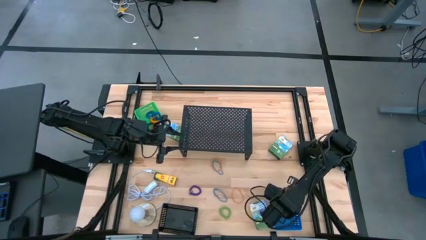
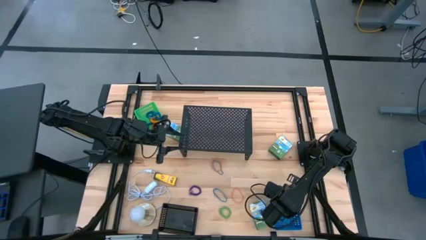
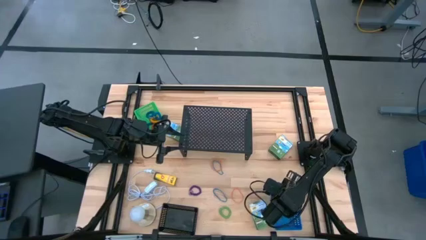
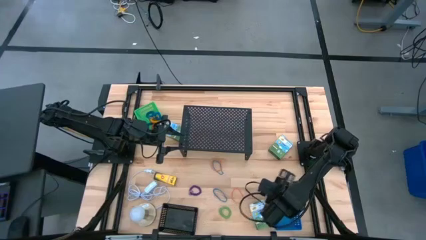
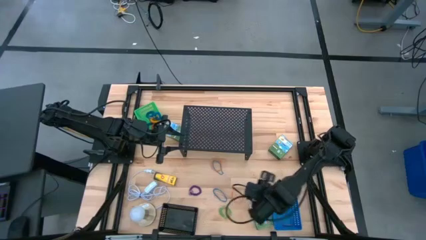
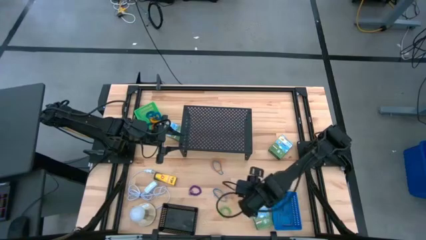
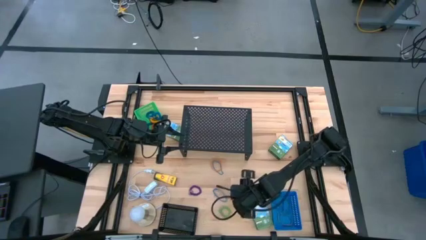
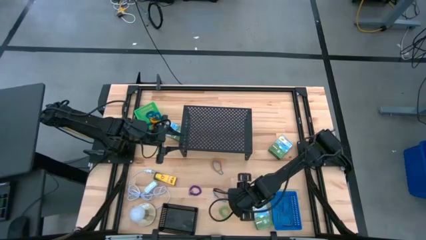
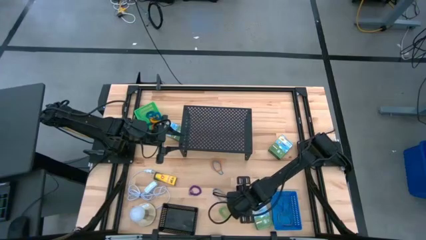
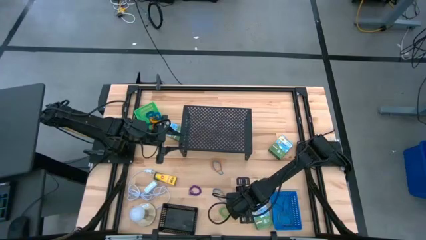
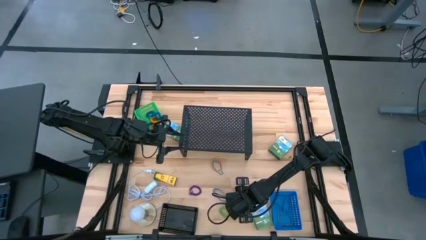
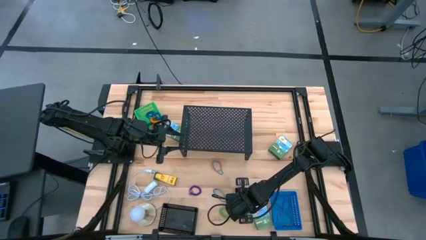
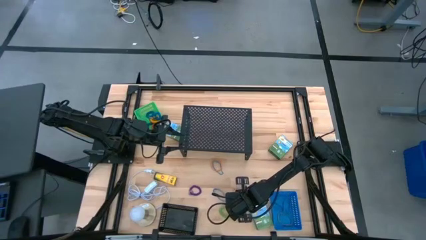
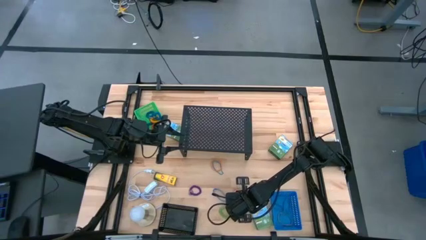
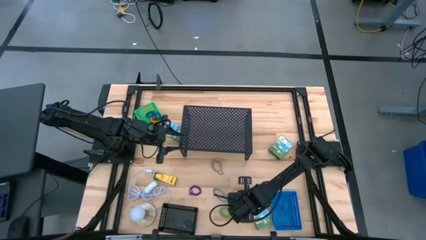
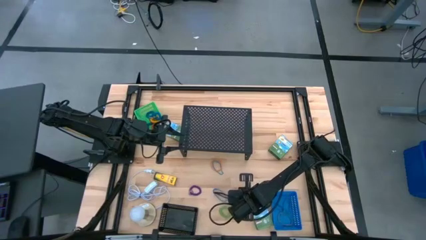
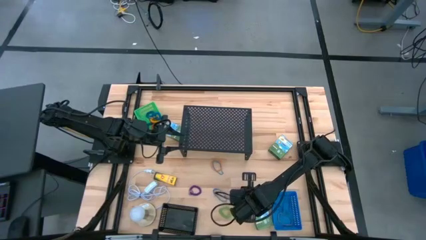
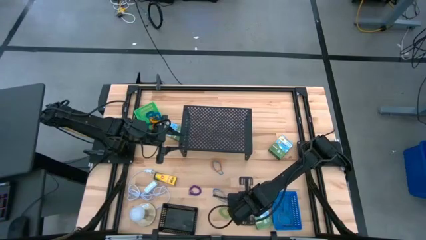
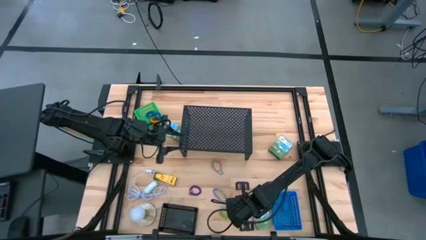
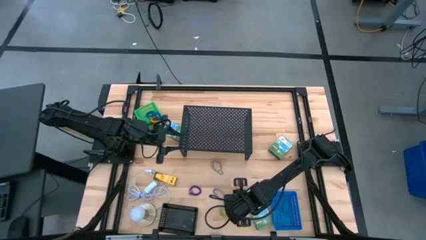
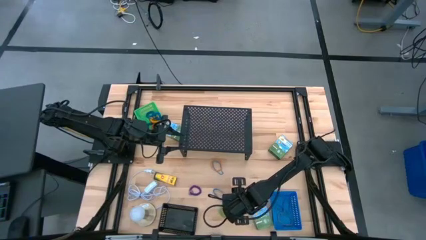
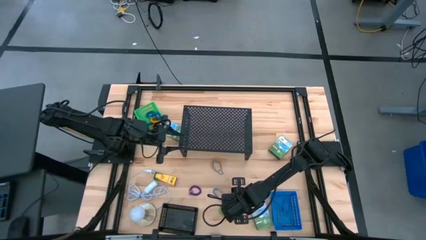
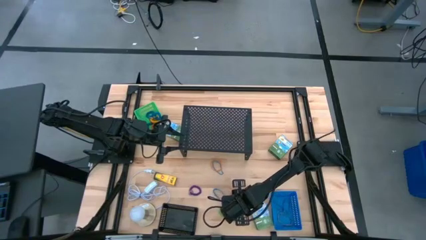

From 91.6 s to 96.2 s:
Task: Pick & Place Office Desk Supplies
Put the orange rubber band into the blue bin

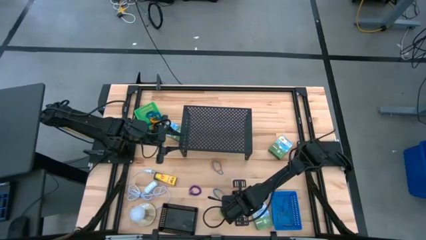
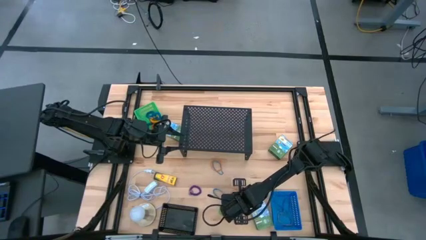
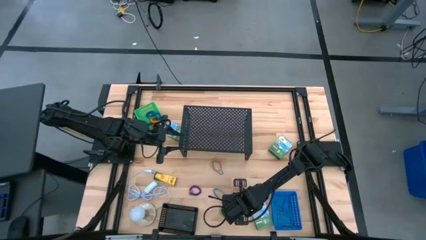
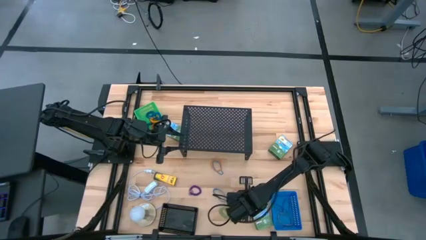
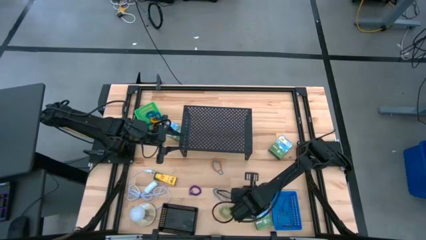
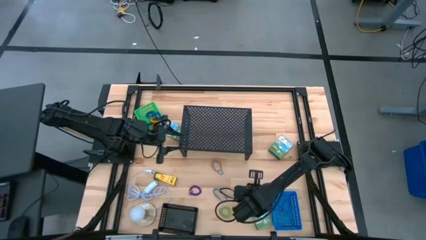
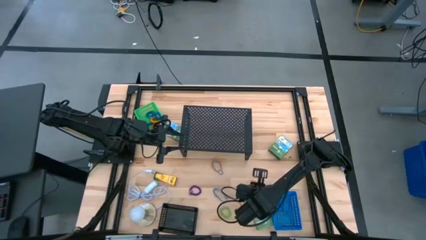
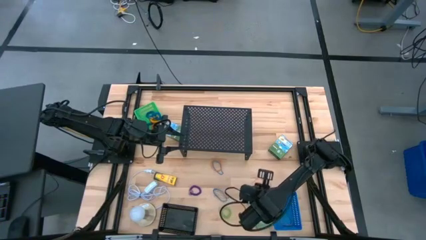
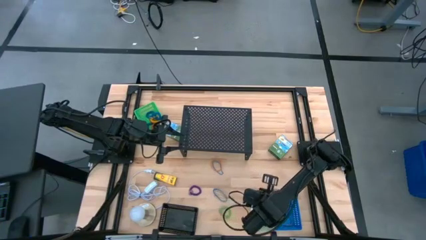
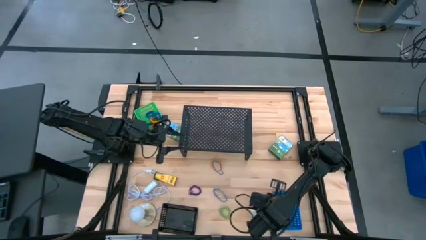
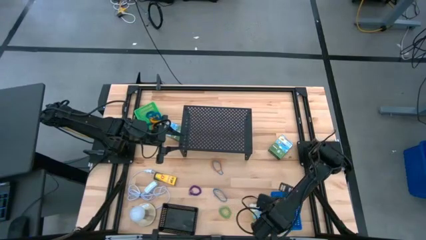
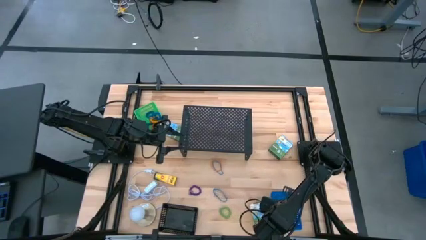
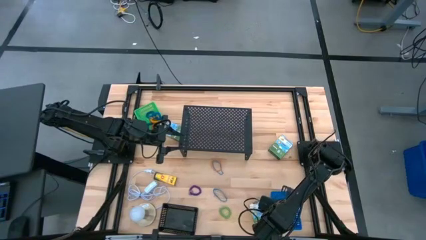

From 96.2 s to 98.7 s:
Put the orange rubber band into the blue bin

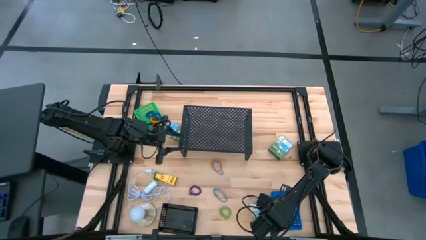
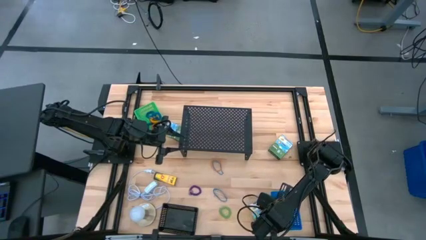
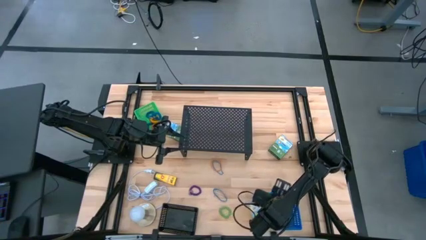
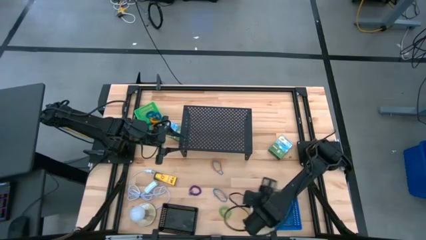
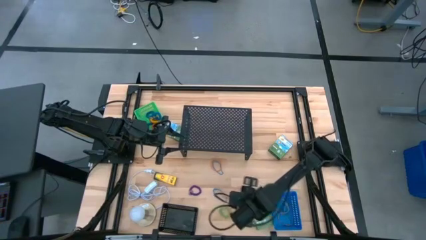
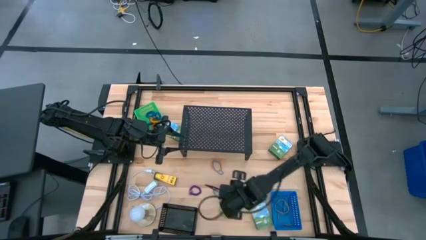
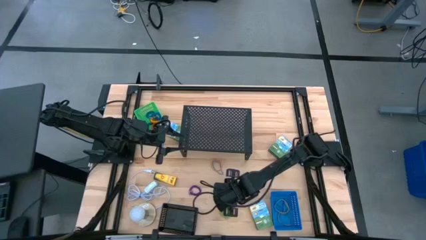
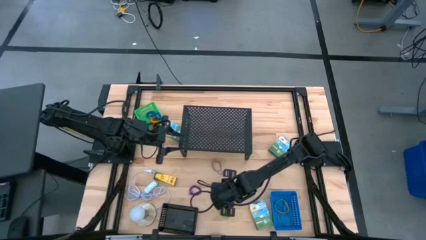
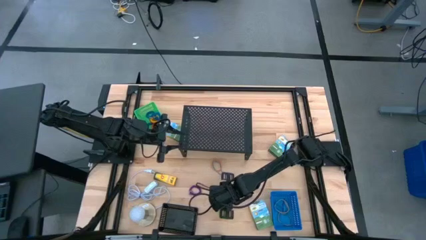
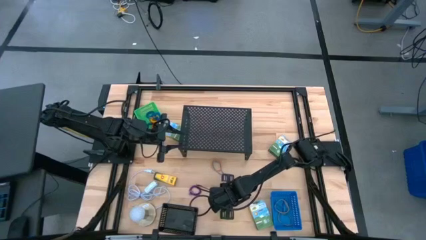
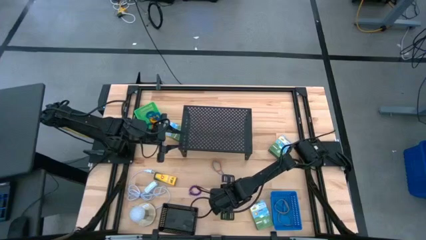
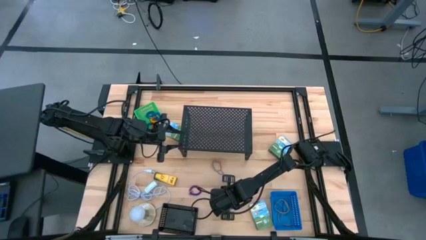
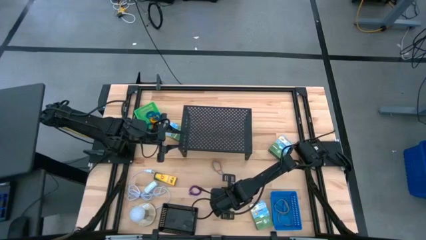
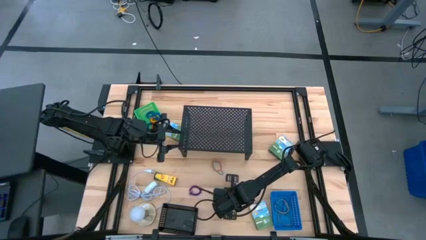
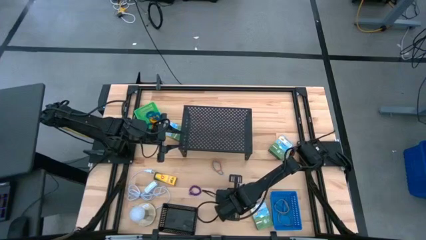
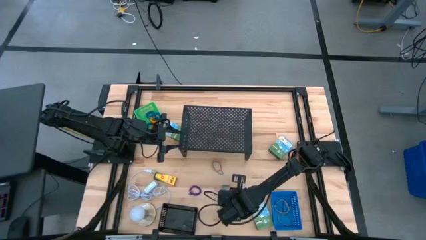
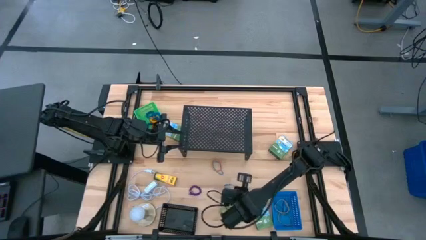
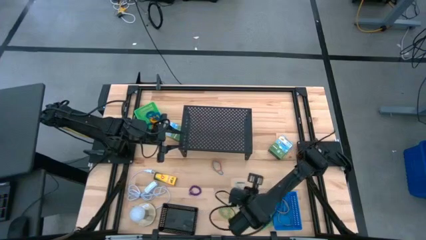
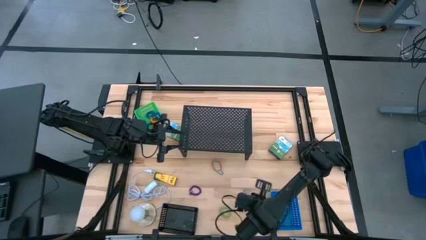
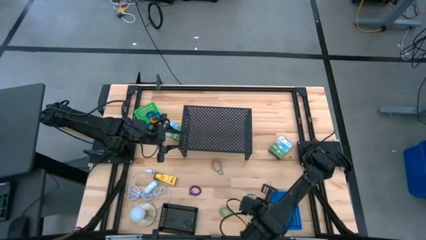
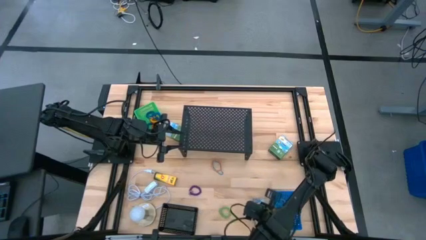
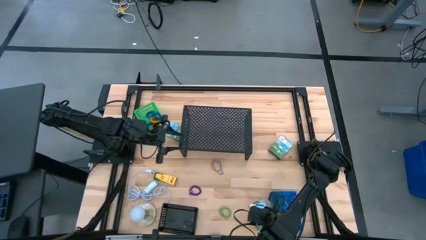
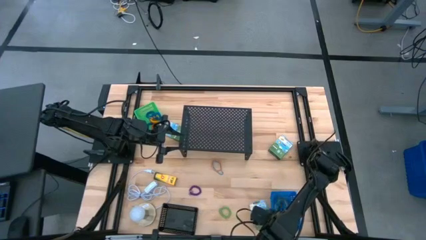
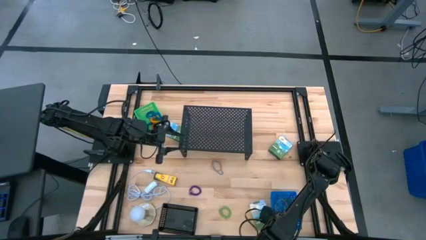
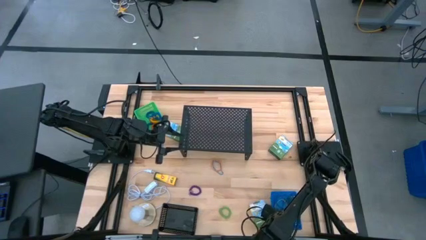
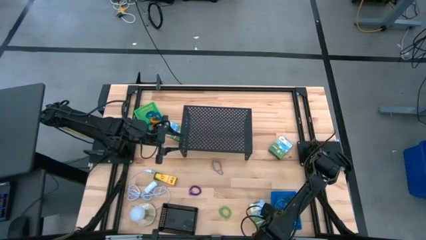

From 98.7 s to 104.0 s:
Put the blue rubber band into the blue bin

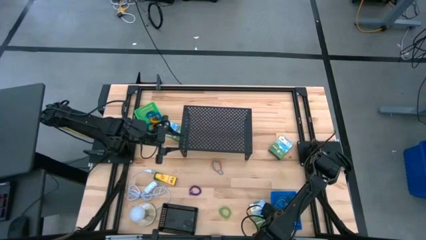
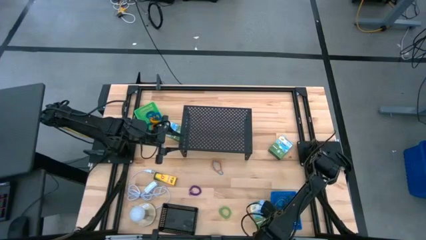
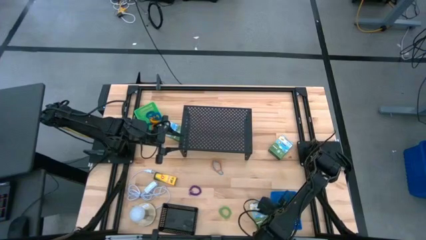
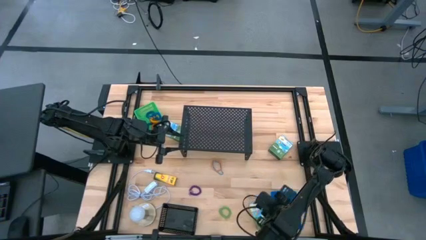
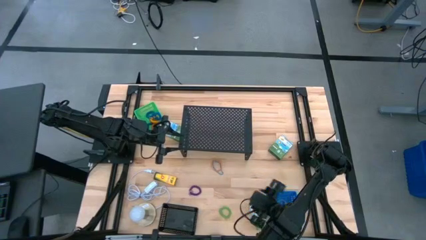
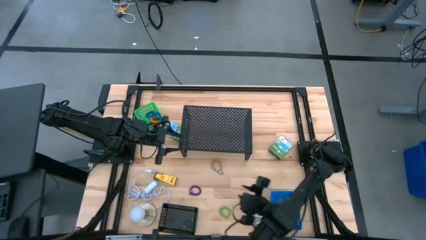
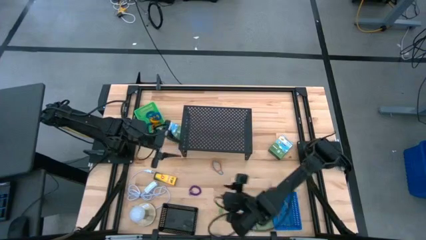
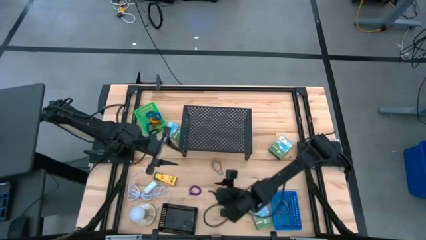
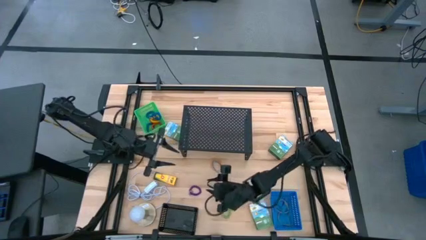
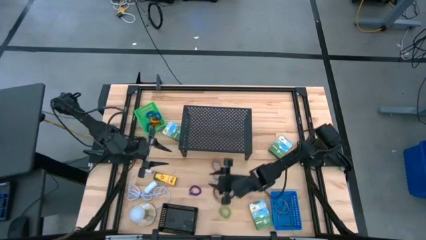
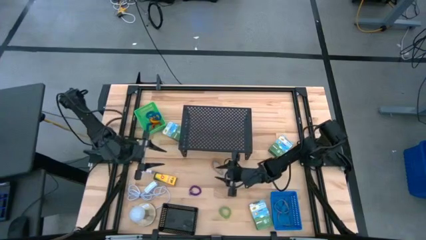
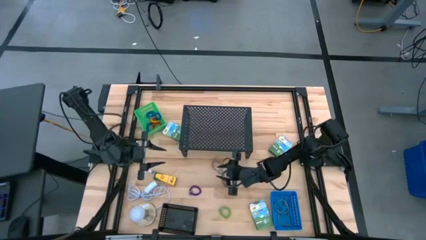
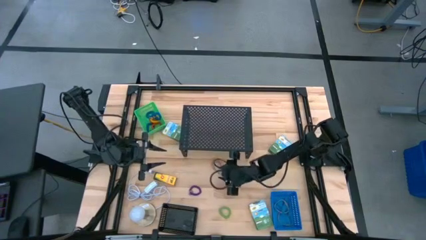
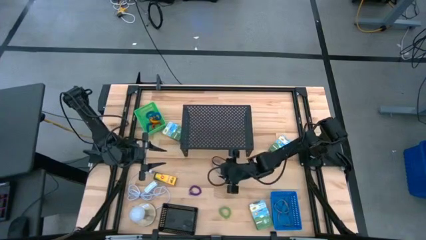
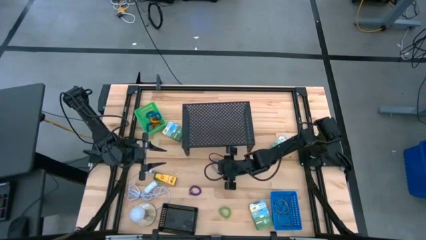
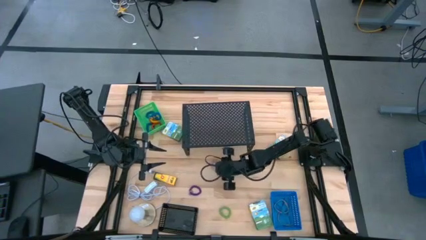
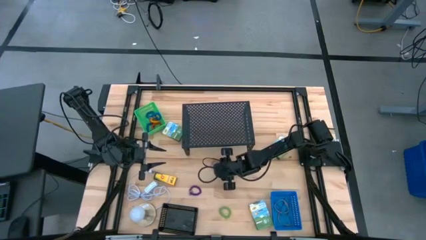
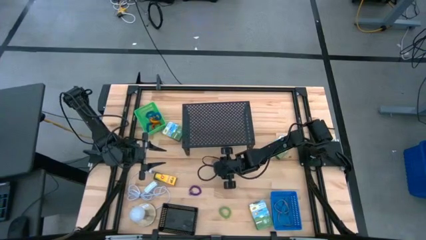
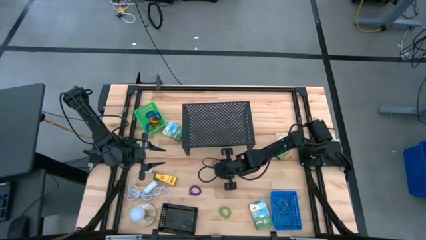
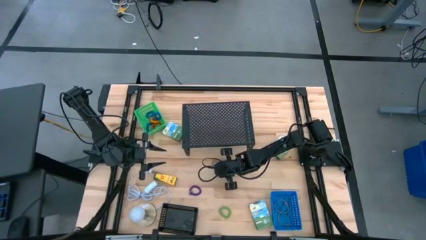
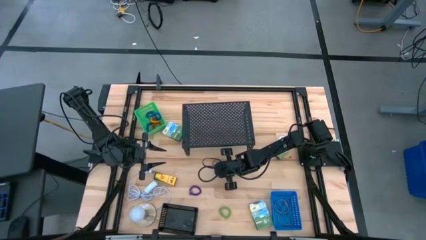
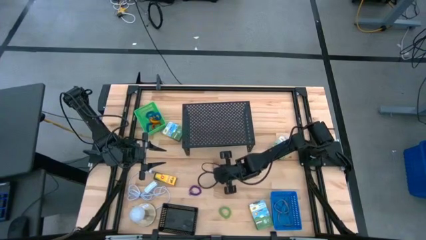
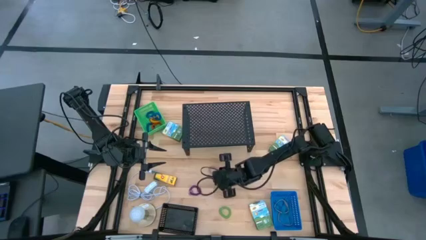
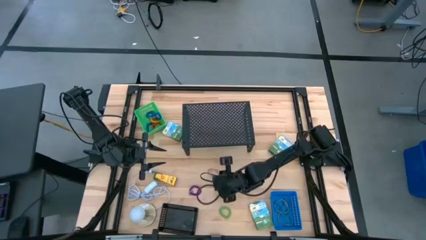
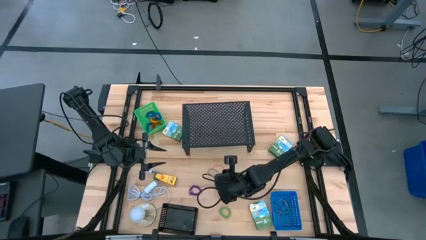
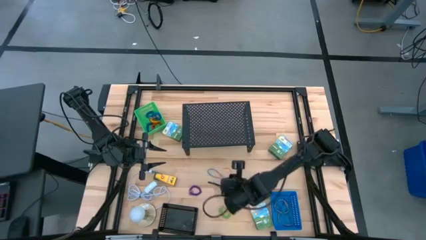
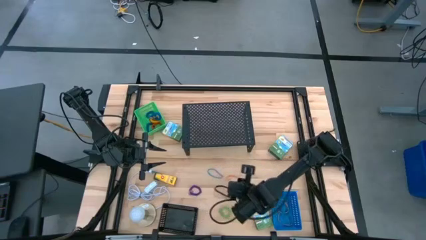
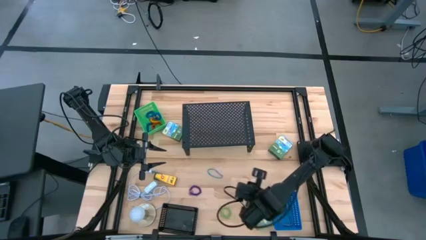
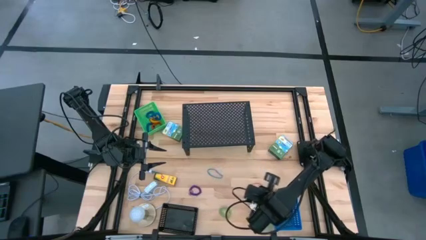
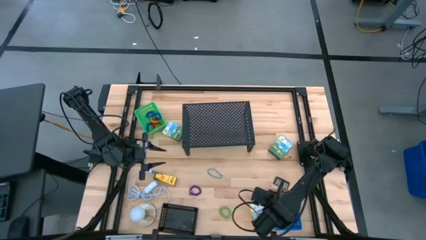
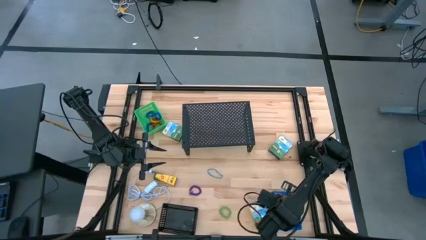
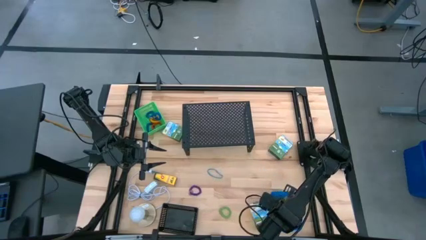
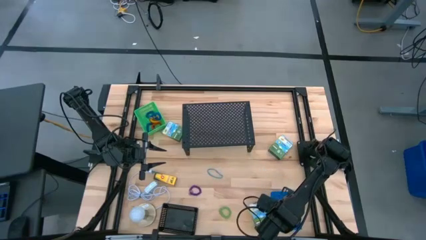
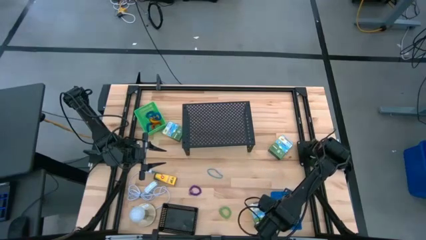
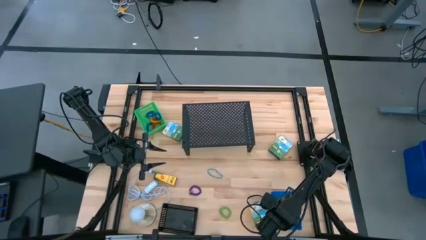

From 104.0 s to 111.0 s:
Put the orange rubber band into the blue bin
